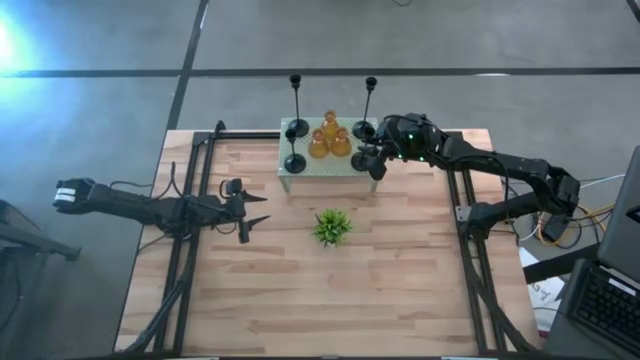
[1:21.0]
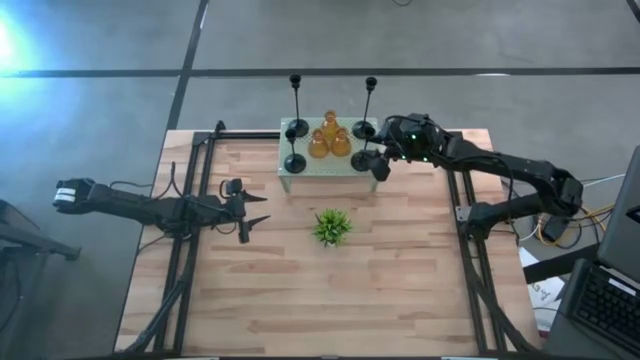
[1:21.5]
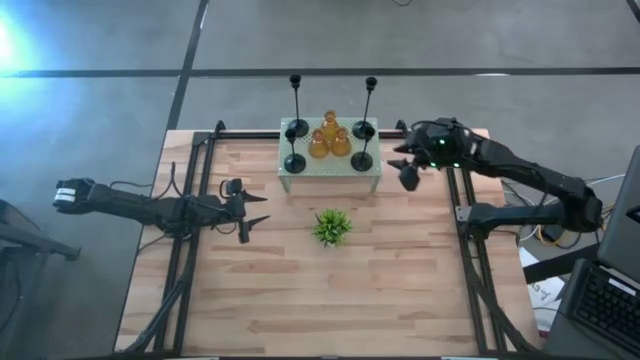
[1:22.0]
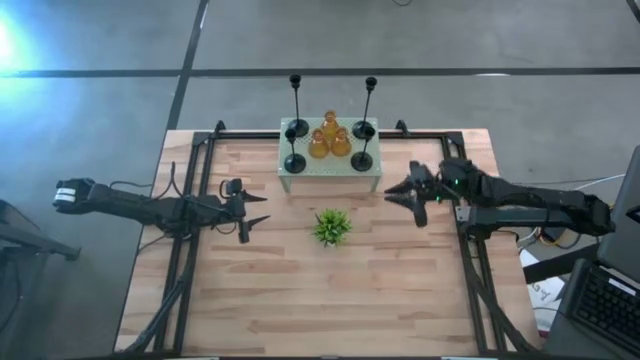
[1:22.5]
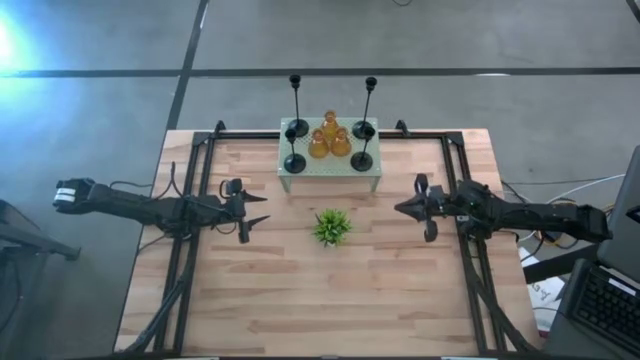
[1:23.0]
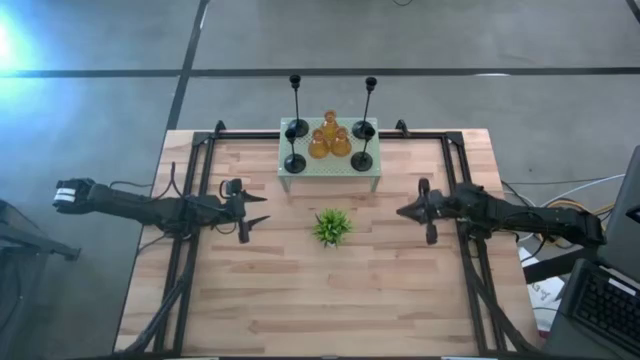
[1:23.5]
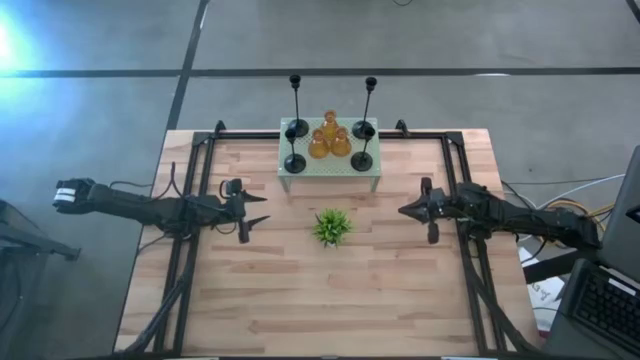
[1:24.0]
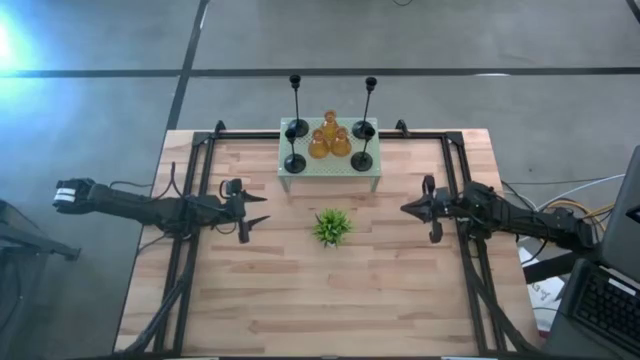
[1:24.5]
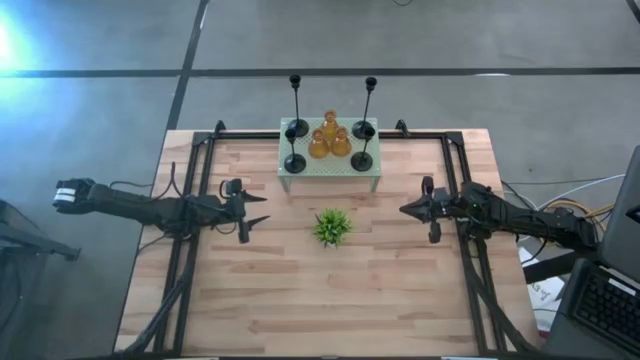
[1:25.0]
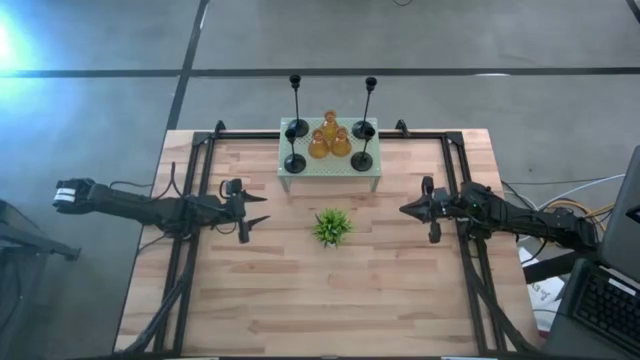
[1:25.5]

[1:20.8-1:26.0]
Task: Pick & Place candle stick holders
Return to Home Position

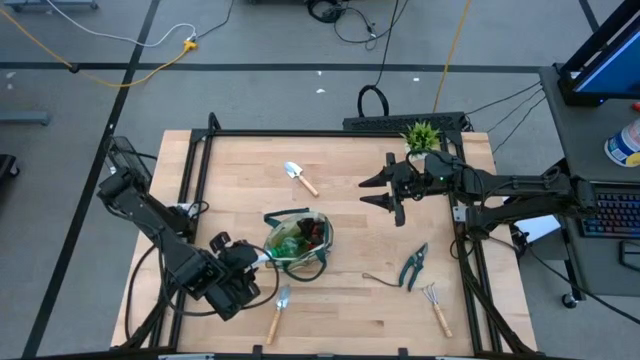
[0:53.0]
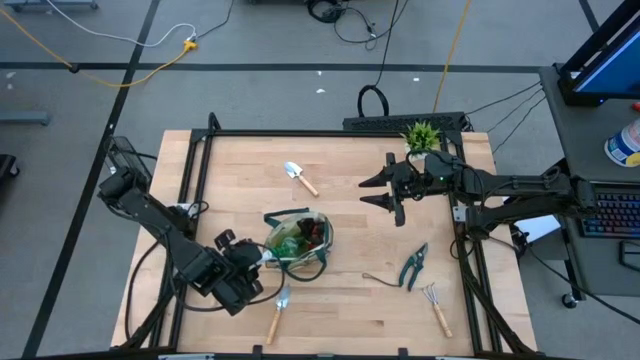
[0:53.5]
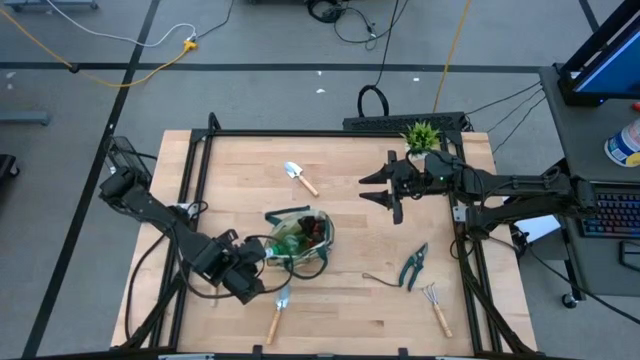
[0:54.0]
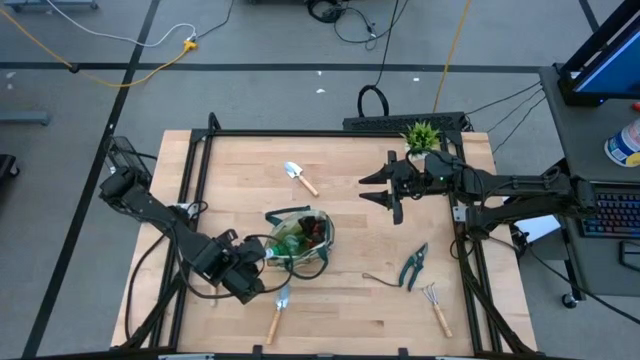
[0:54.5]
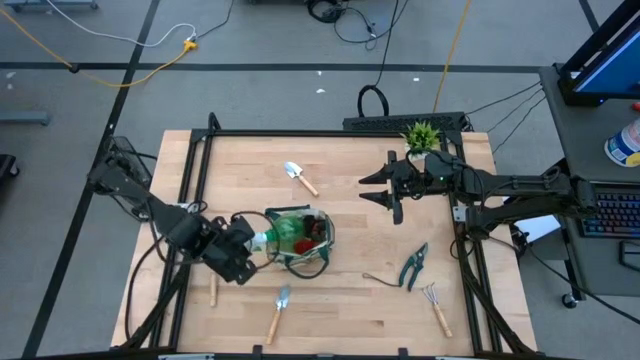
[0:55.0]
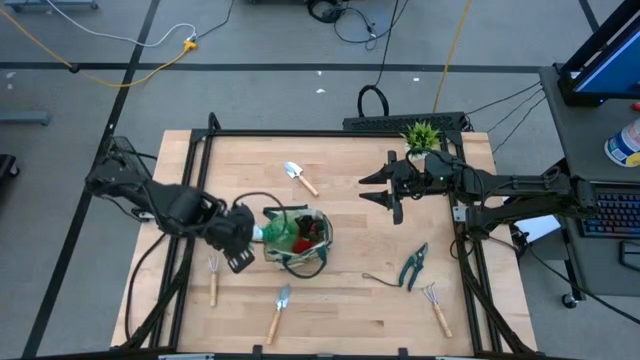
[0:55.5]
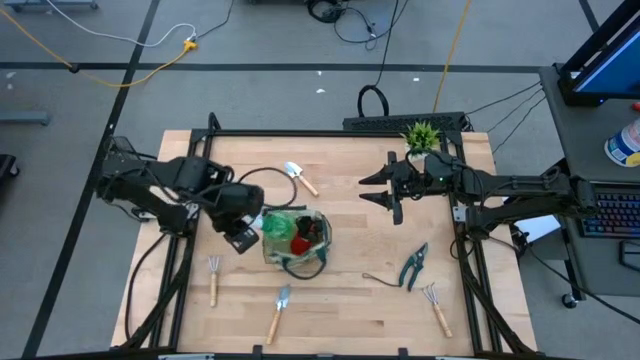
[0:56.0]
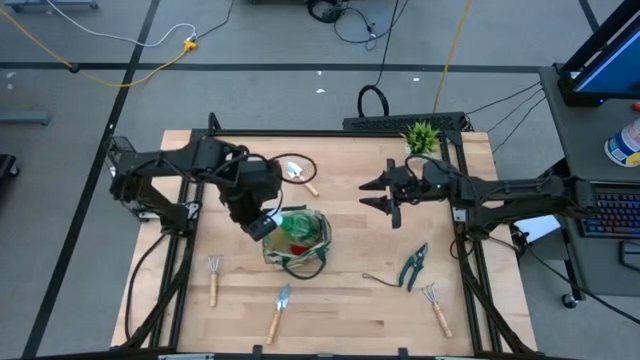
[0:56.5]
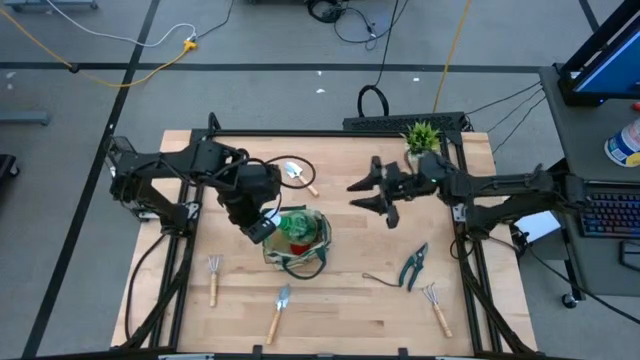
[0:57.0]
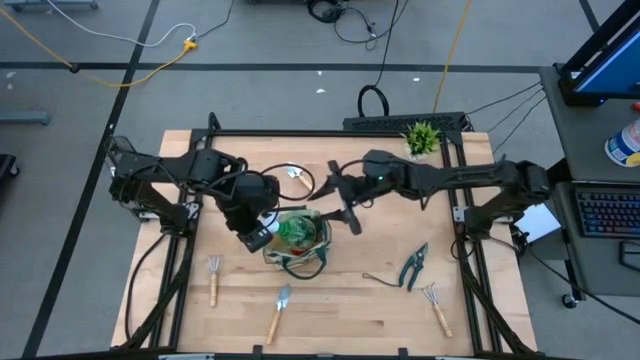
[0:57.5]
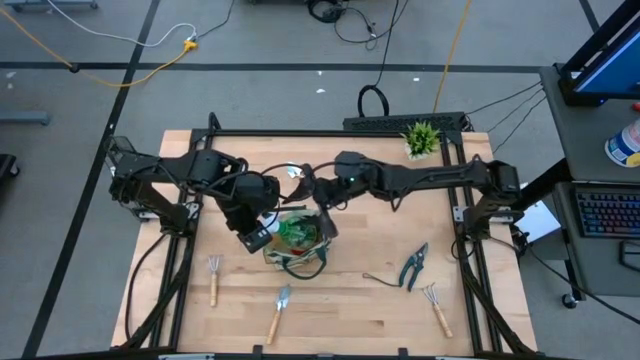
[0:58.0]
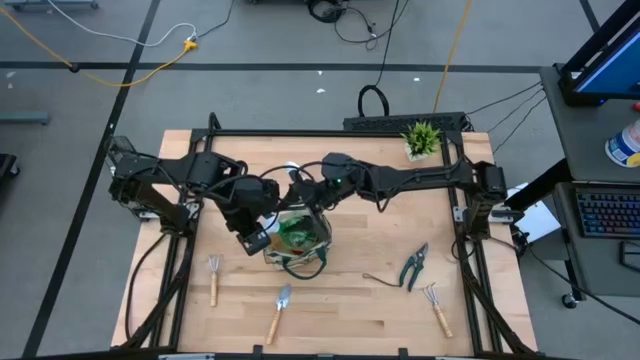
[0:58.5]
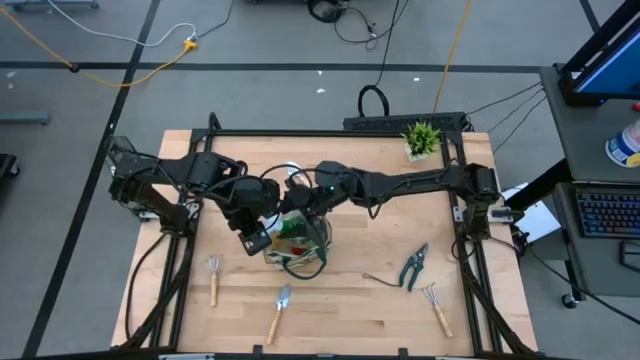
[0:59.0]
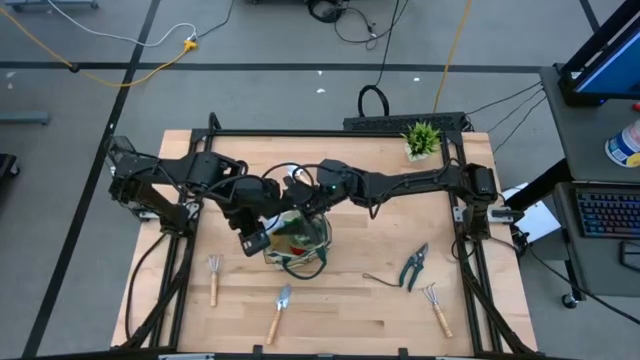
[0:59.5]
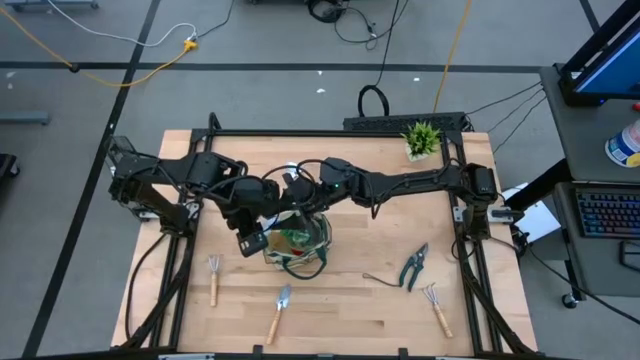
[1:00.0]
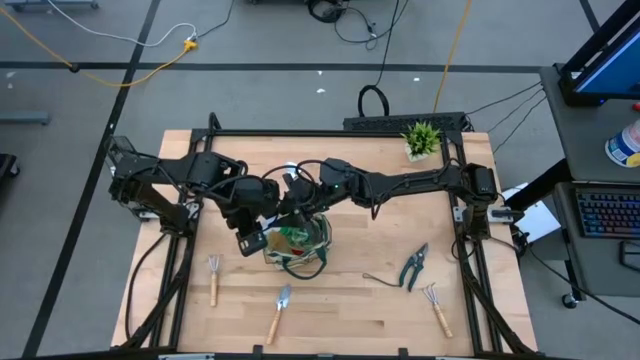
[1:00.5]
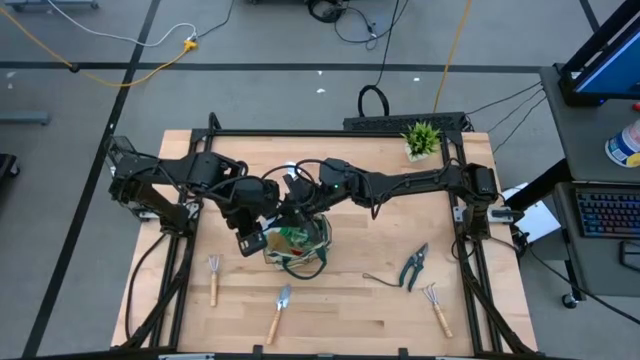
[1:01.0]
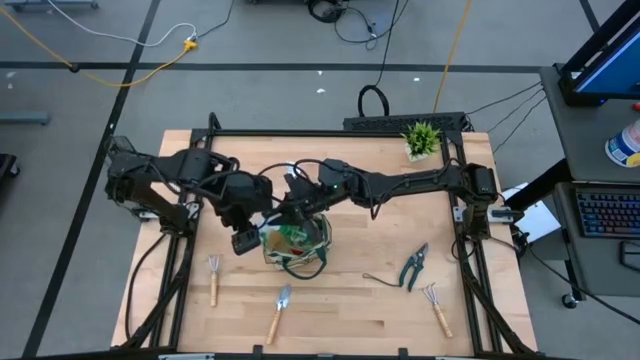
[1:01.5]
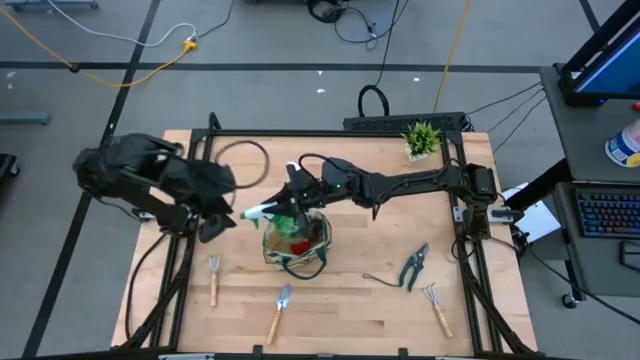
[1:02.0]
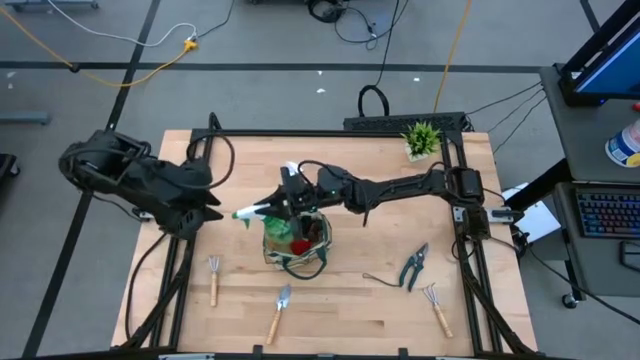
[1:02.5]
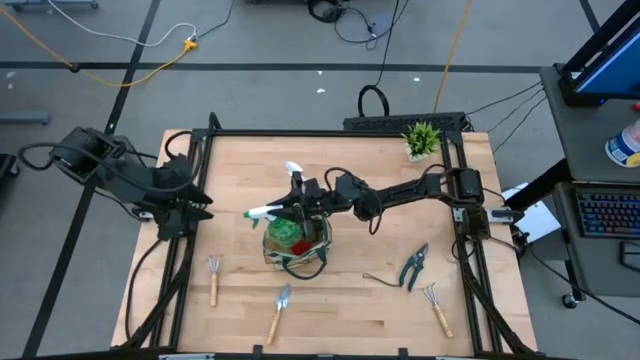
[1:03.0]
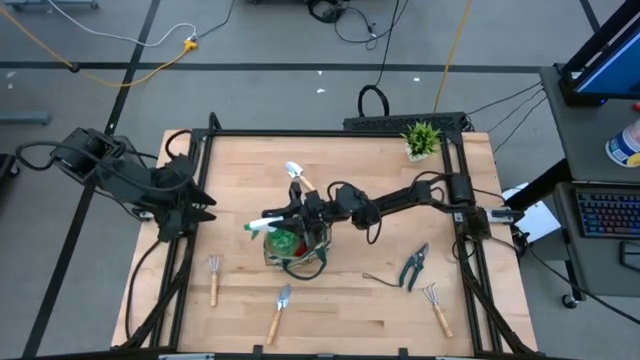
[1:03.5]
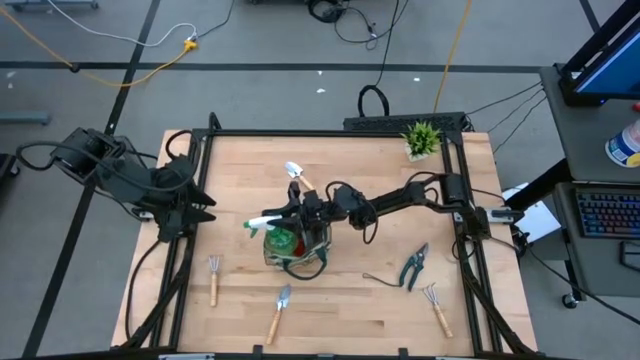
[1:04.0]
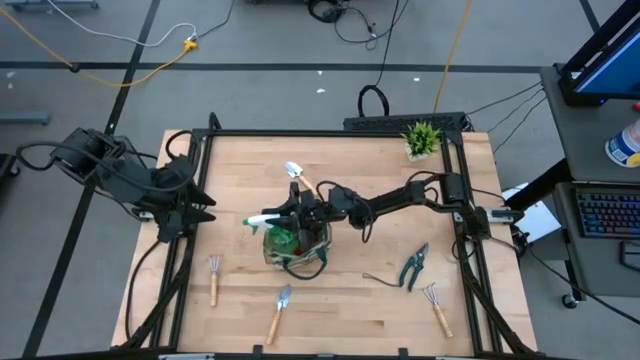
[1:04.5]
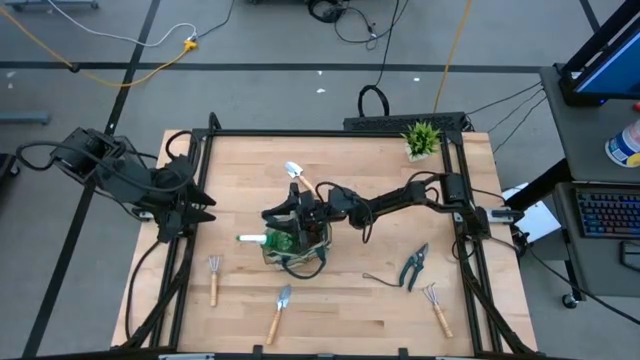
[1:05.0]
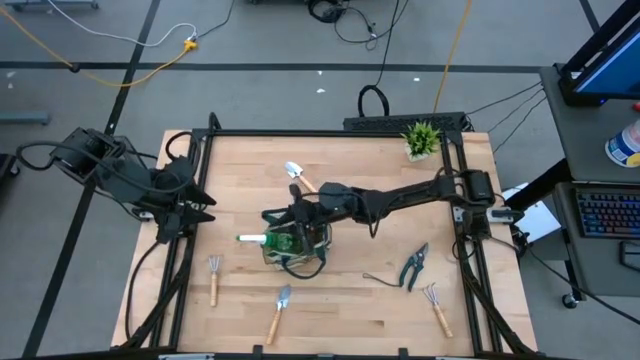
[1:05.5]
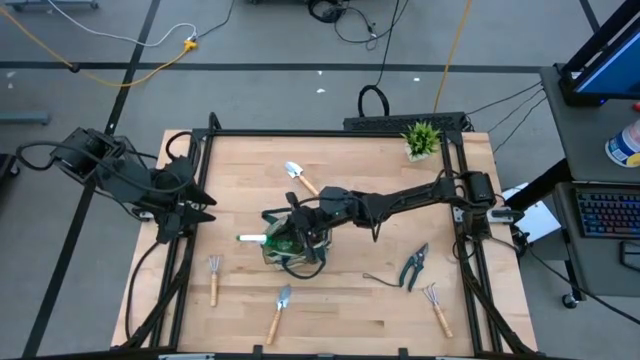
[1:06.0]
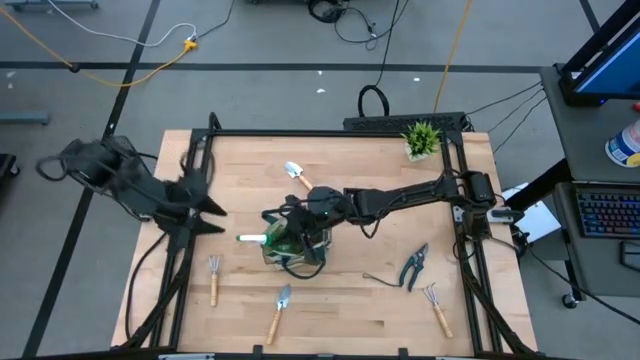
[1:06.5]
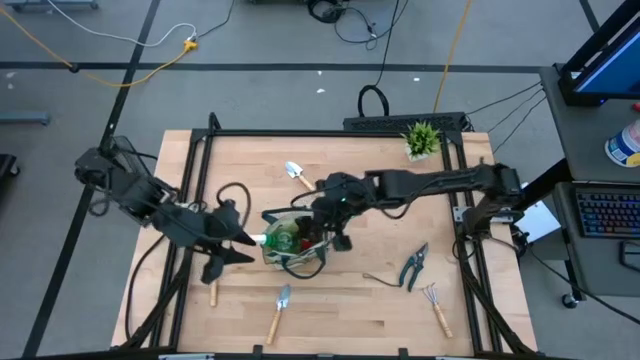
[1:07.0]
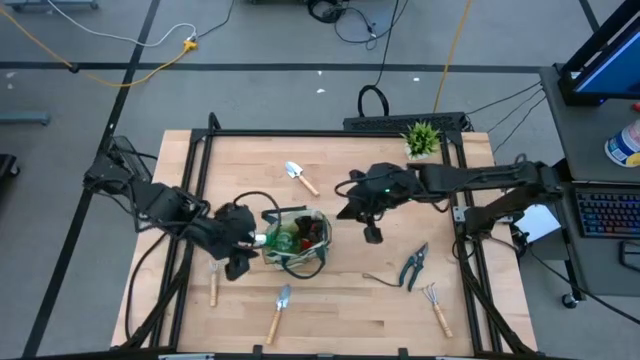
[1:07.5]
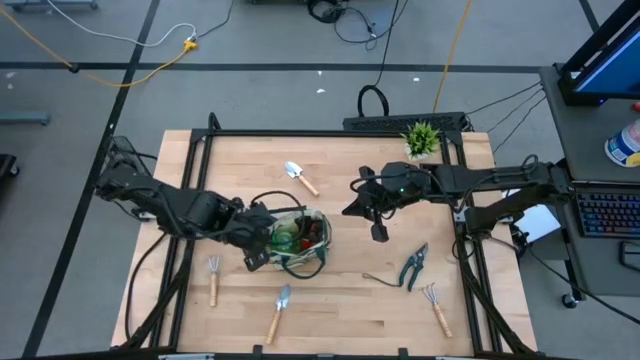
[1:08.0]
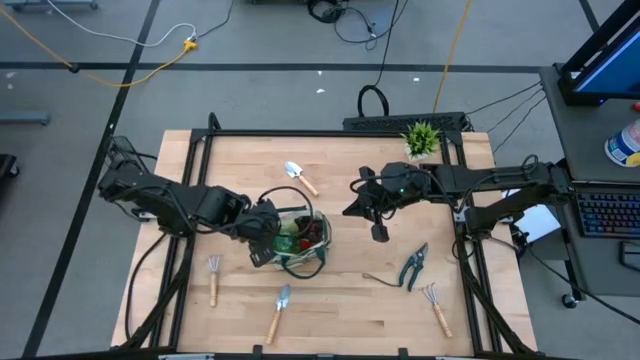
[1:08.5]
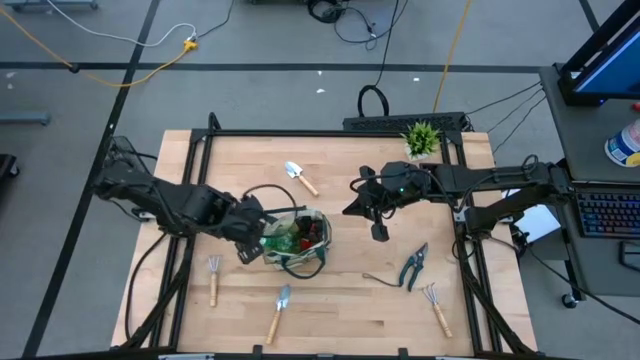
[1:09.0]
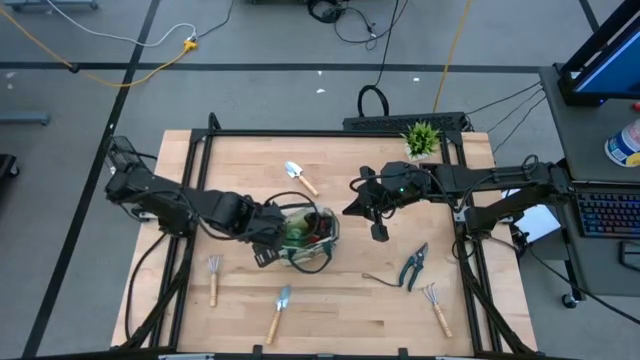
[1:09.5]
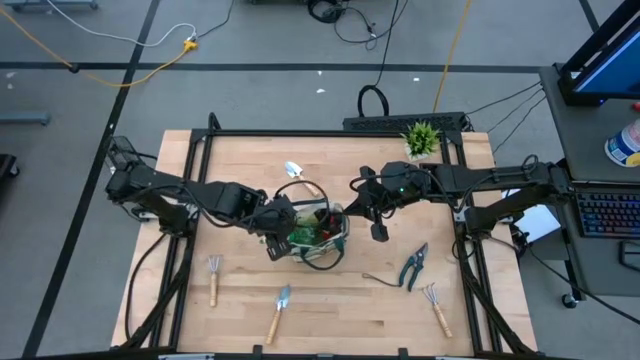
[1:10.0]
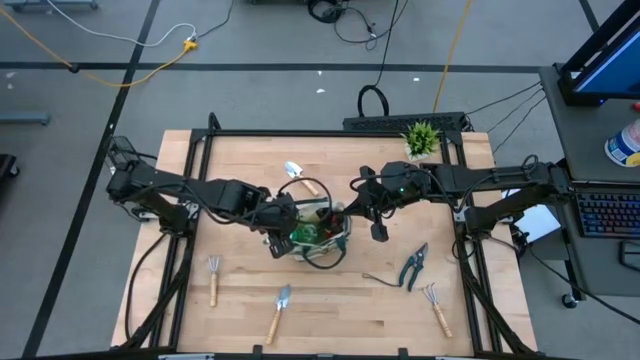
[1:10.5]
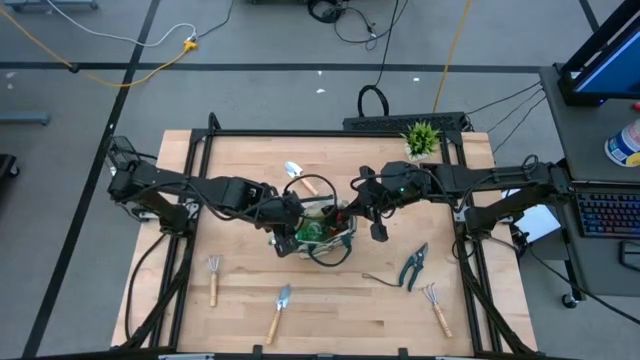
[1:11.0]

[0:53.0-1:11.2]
Task: Pick & Place Garden tools in Gardening bag
Put the spray bottle into the gardening bag
